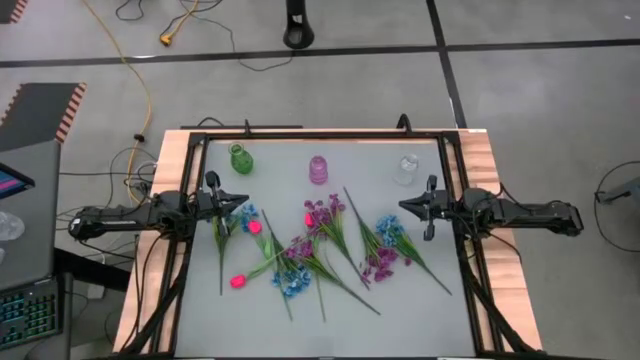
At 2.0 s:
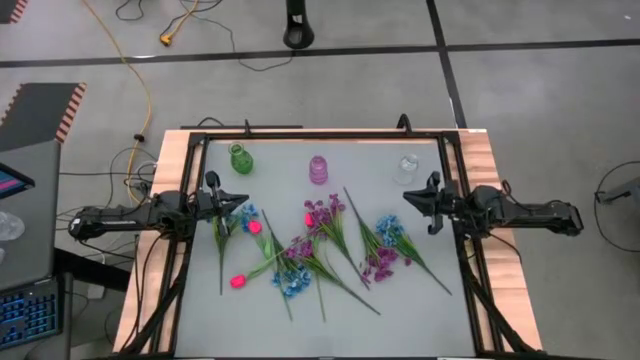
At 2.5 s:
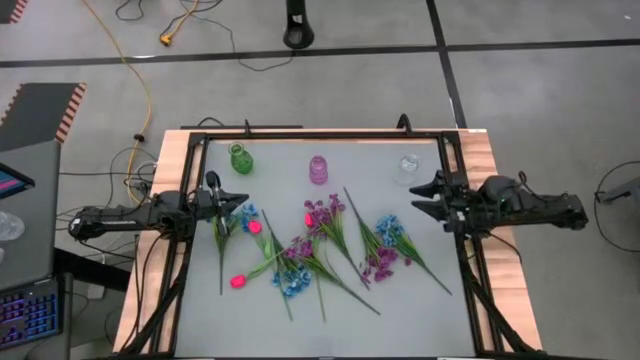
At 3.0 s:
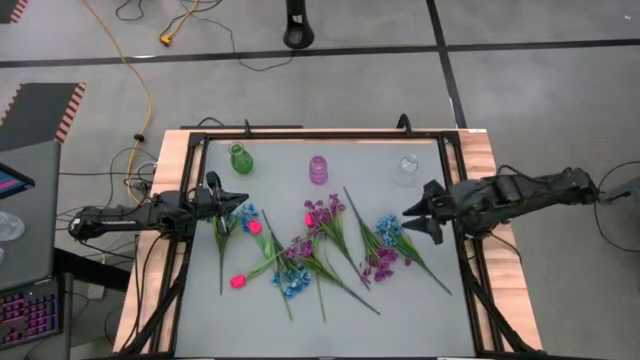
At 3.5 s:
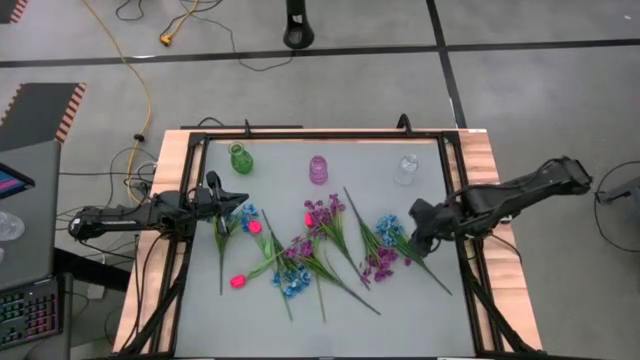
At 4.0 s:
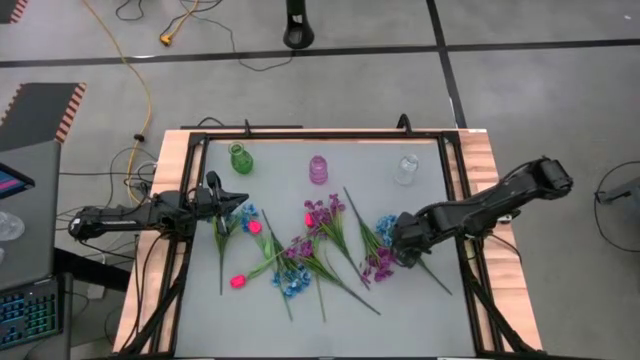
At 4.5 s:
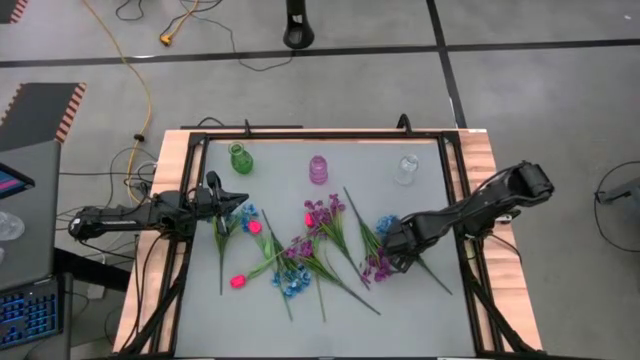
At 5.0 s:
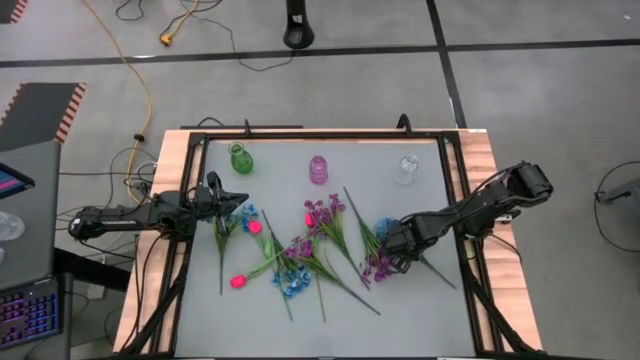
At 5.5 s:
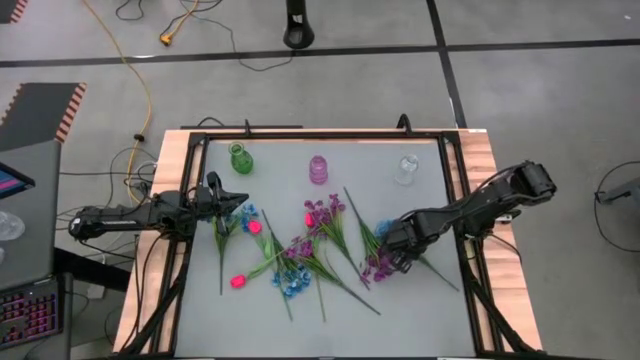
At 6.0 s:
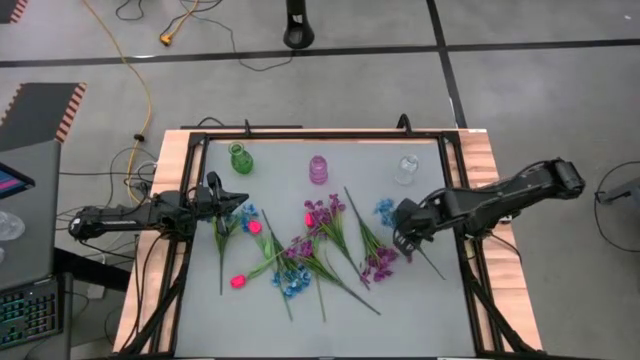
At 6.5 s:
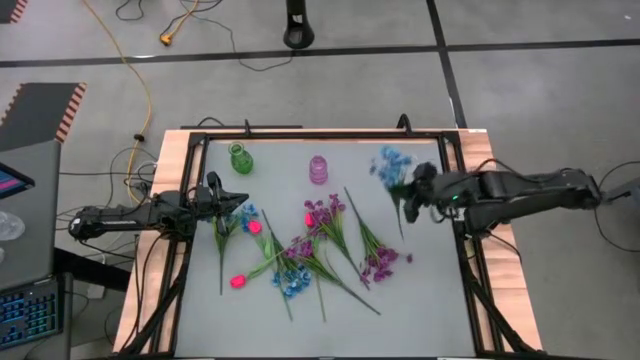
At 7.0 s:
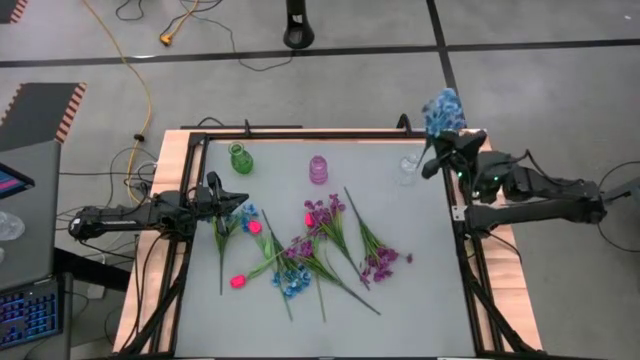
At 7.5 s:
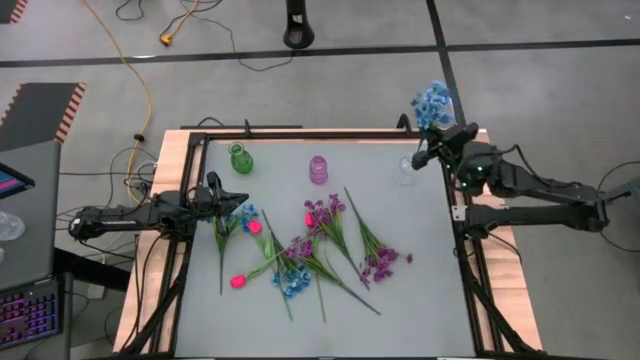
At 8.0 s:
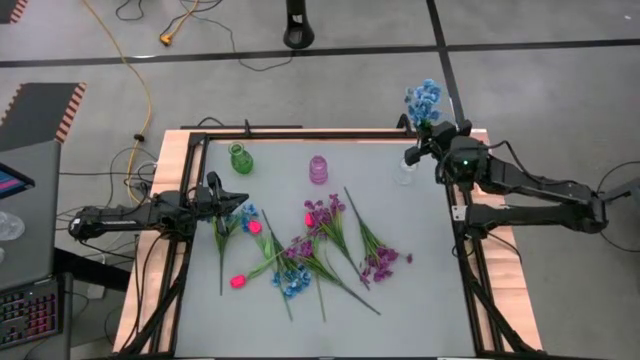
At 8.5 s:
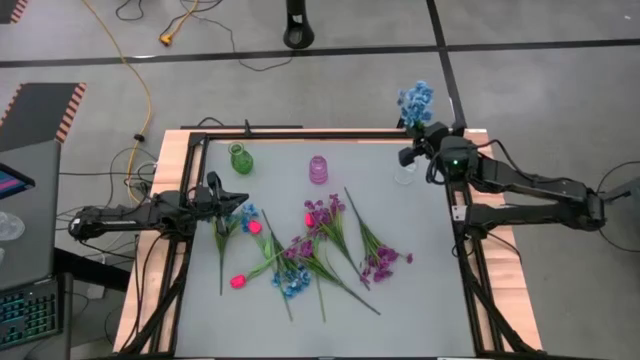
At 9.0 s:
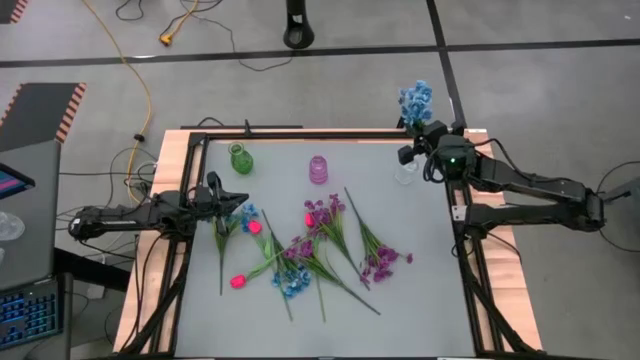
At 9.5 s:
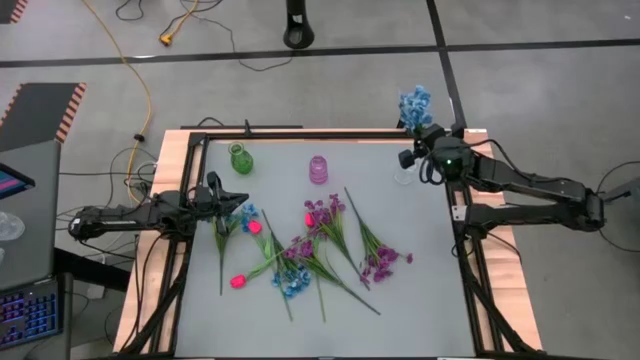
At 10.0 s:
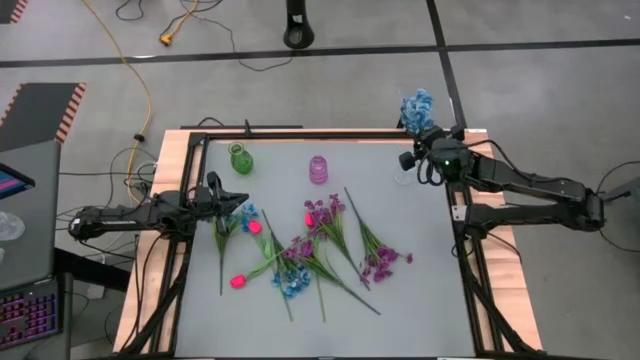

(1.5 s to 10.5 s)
Task: Sort flowers into vase by color
Put the right blue flowers into the transparent vase

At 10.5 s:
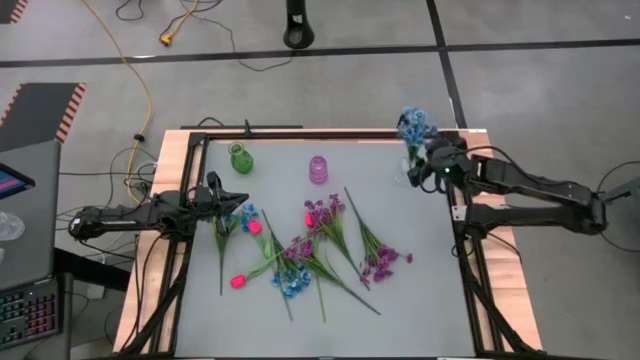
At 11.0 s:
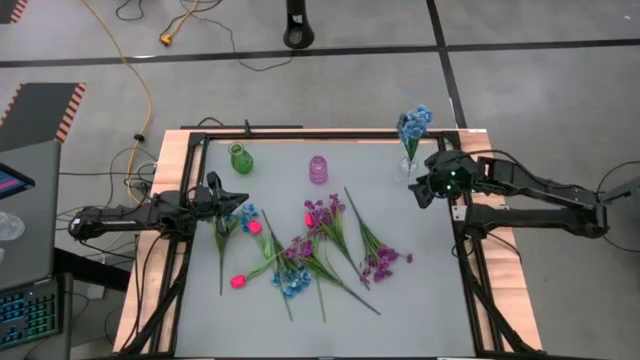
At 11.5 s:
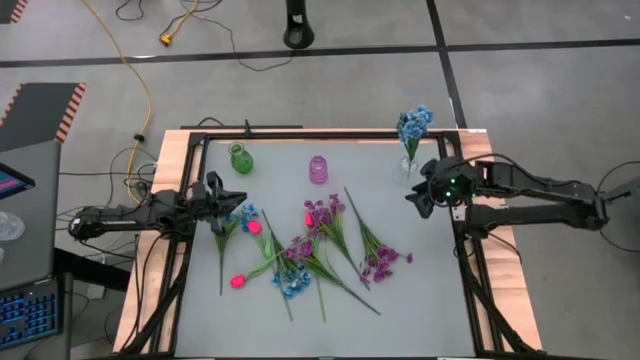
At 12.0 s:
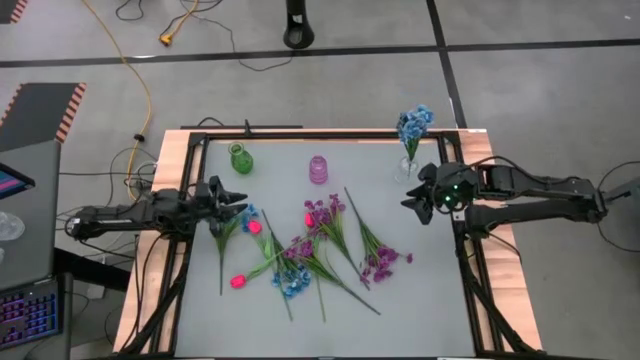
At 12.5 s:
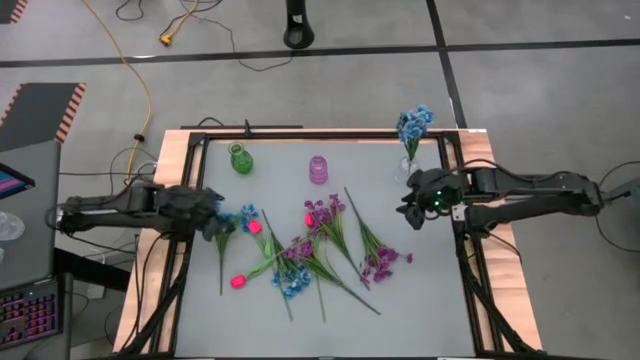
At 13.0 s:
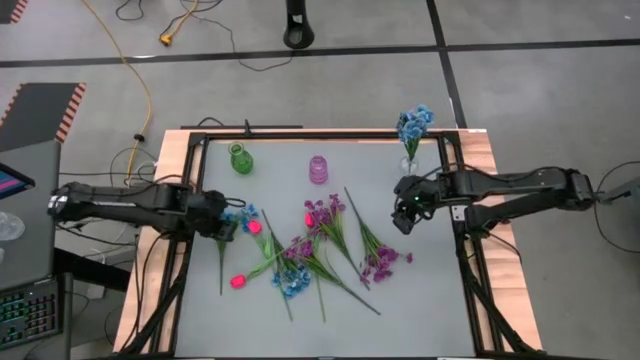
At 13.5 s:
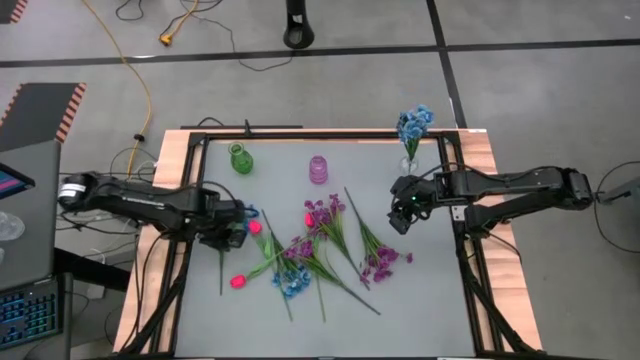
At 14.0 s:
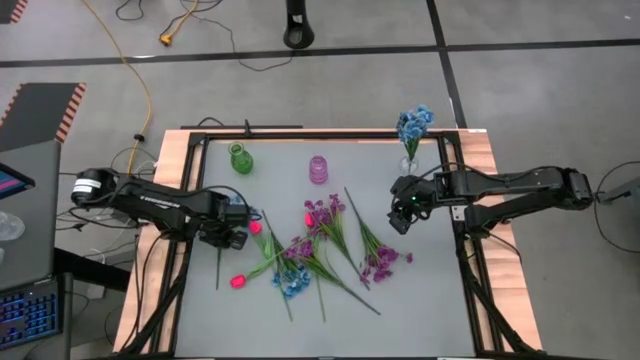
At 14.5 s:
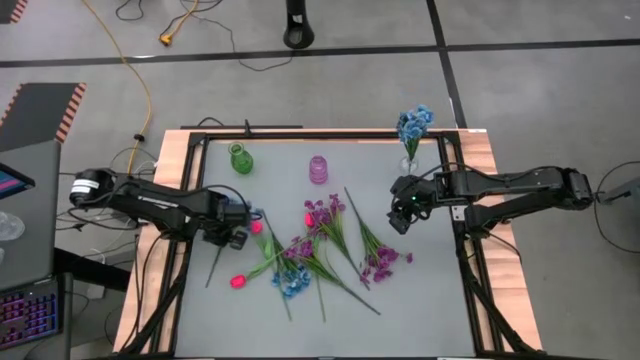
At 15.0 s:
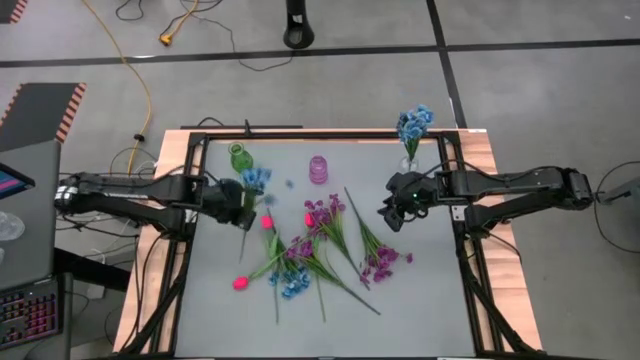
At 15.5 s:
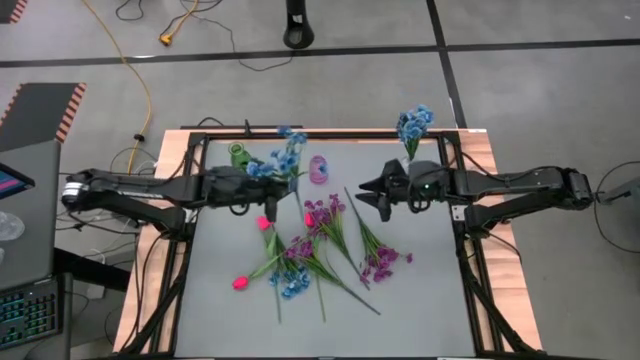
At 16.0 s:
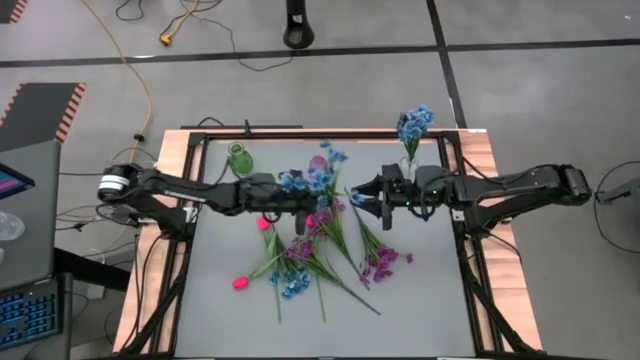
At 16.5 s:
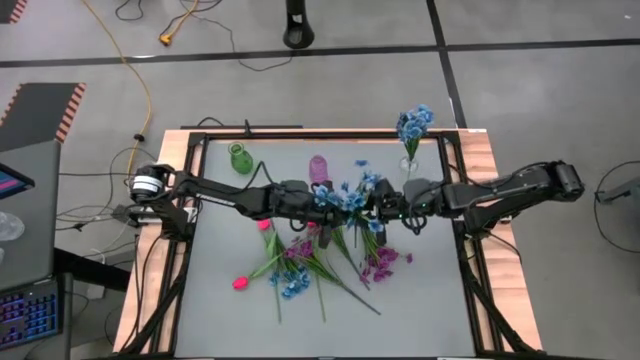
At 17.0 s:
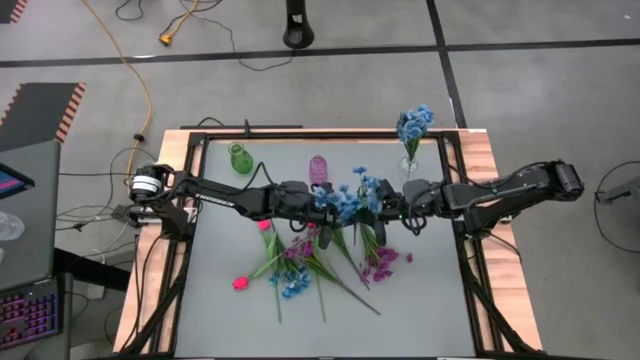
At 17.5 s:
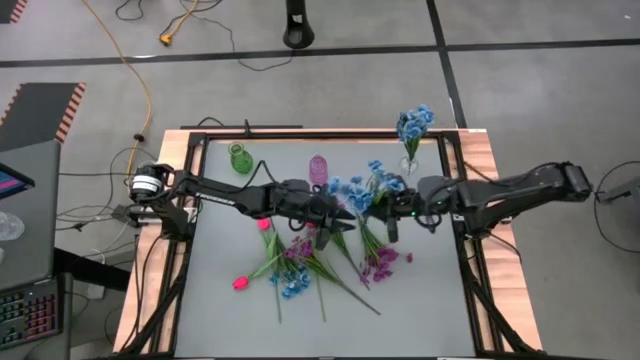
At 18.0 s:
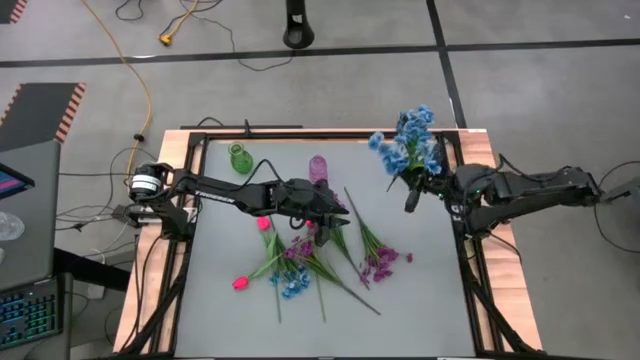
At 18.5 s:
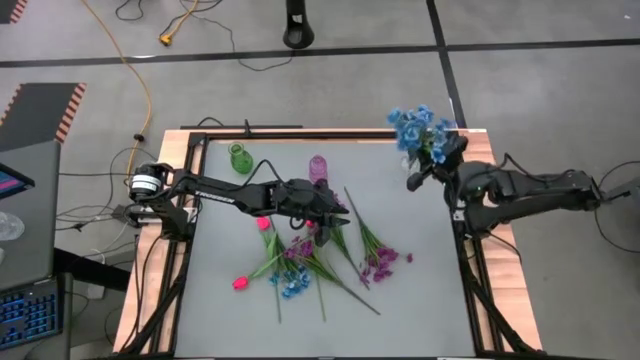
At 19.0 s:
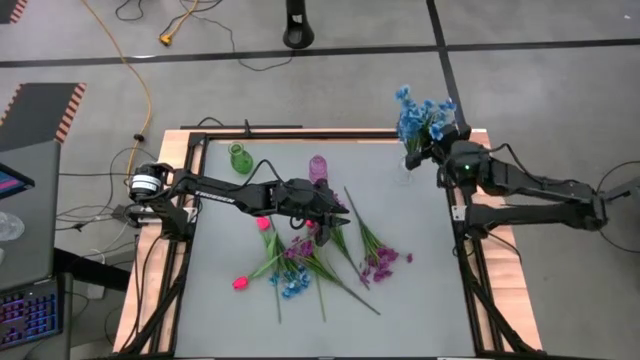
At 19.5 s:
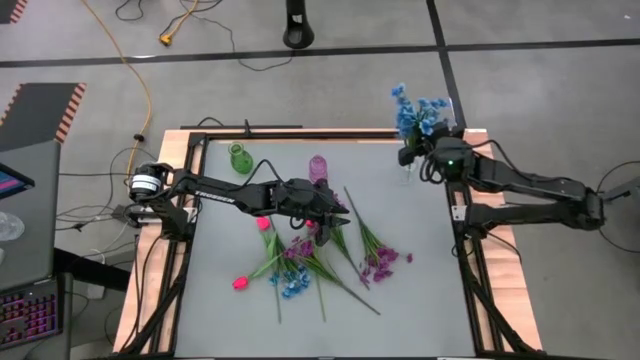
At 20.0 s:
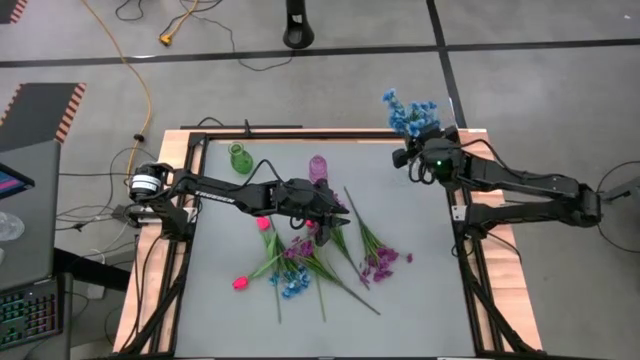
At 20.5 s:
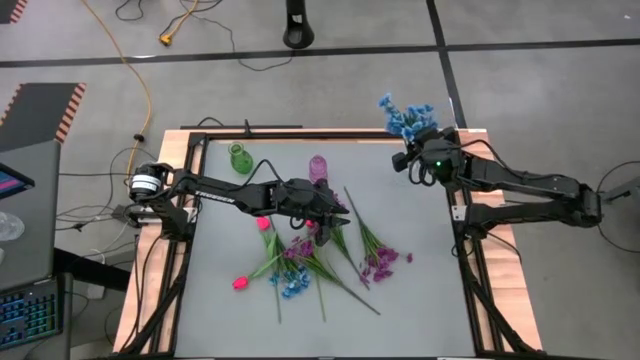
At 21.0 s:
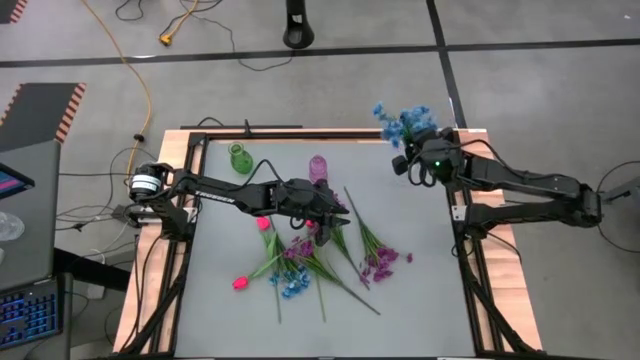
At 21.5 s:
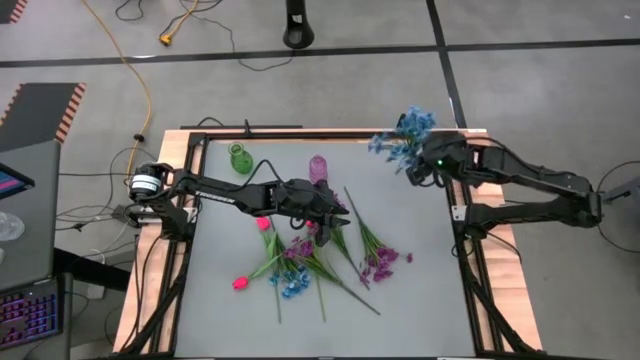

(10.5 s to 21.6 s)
Put the left blue flowers into the transparent vase
